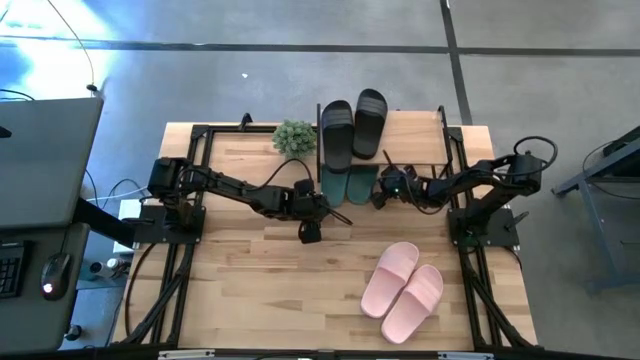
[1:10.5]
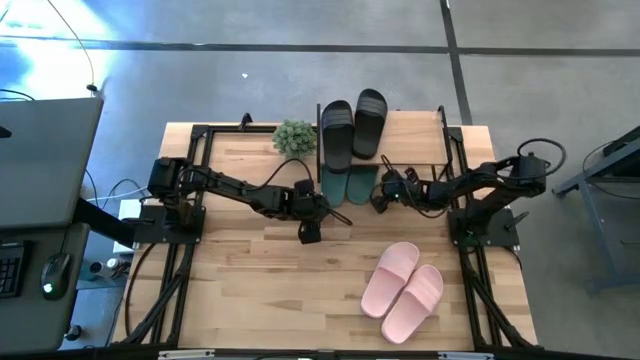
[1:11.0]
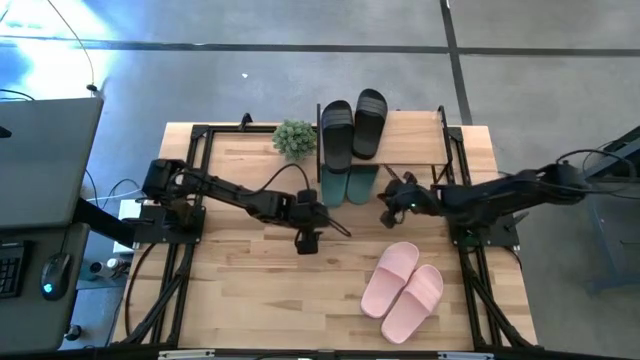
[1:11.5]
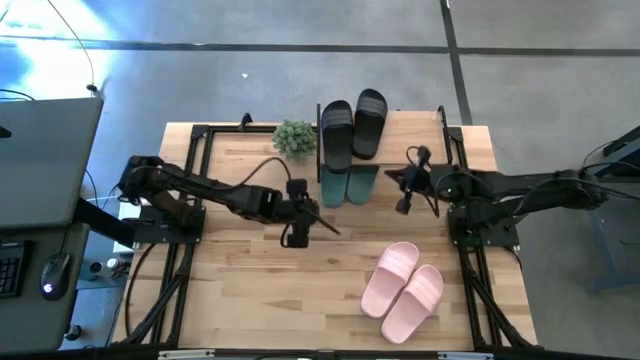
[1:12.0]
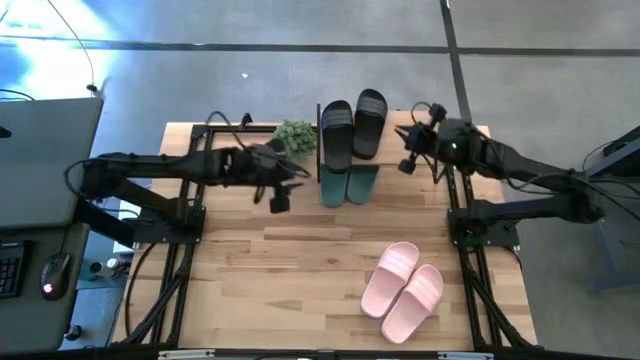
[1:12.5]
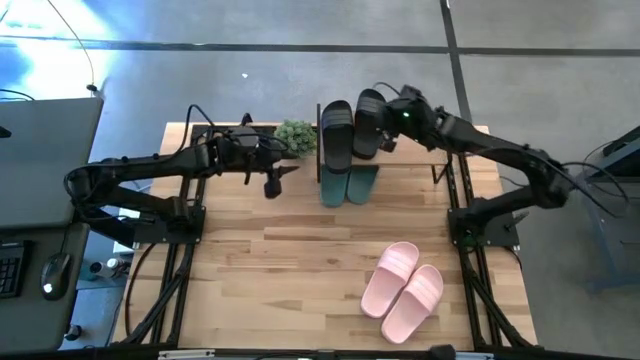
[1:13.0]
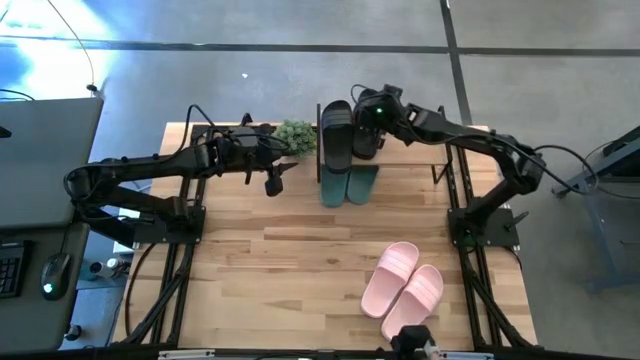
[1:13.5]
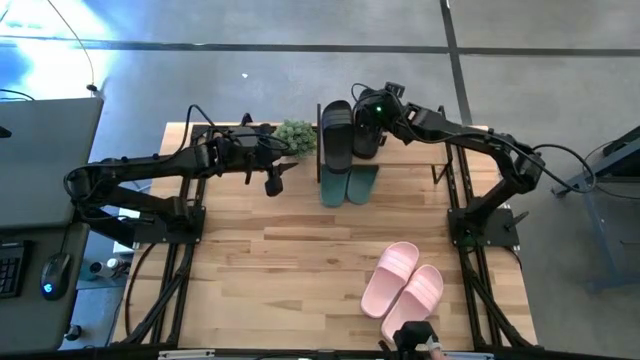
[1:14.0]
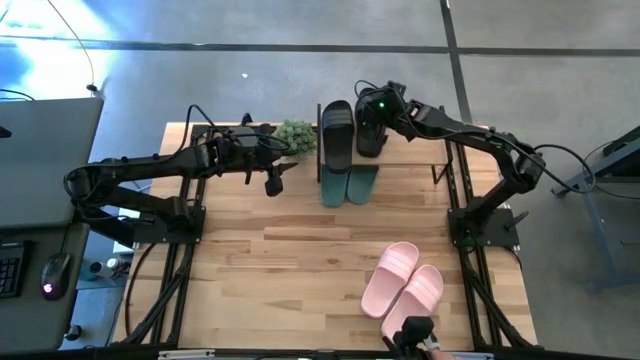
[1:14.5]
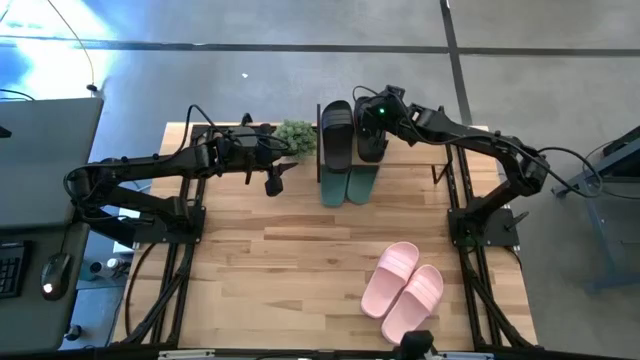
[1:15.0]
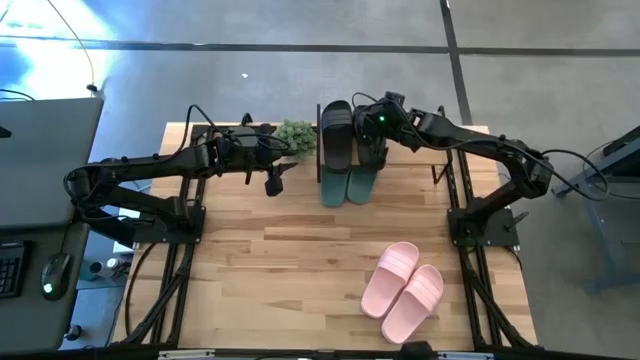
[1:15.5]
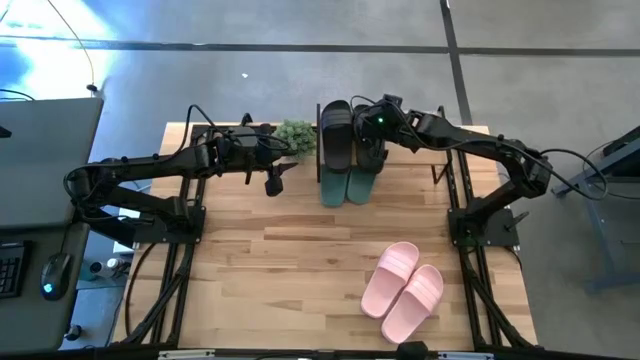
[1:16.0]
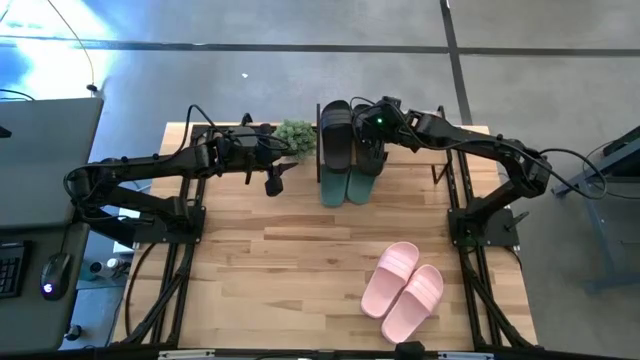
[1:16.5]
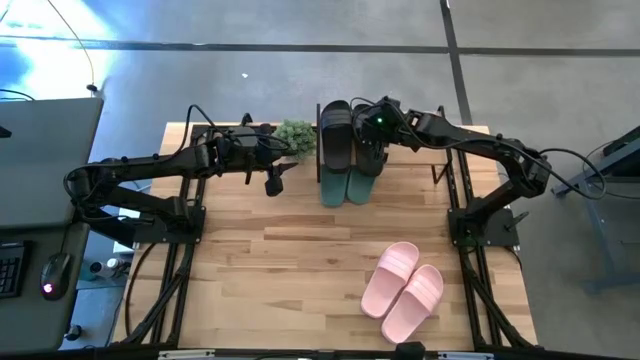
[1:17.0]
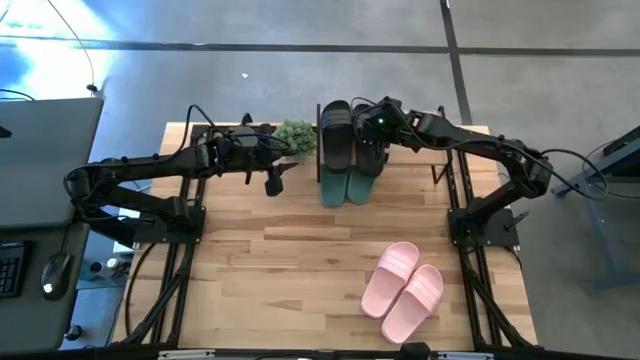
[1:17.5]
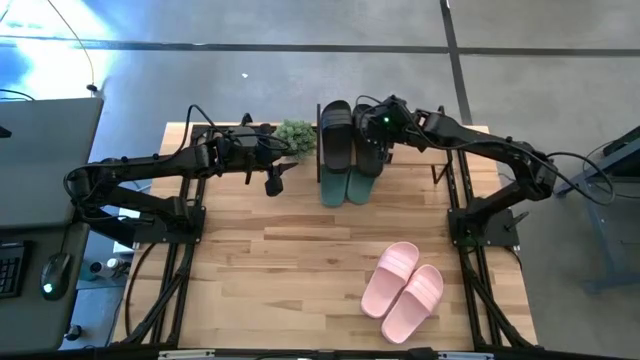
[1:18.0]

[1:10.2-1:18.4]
Task: Pick and place slides into the shelf
Adjust the right black slide on the shelf

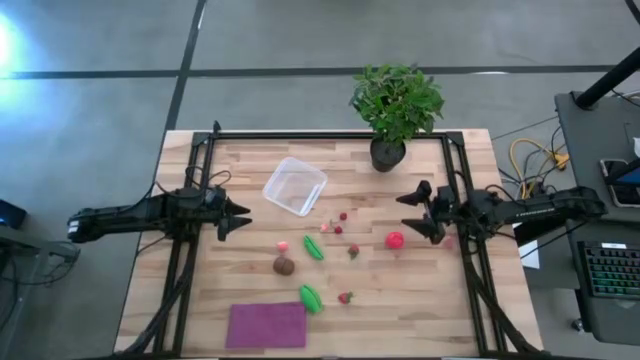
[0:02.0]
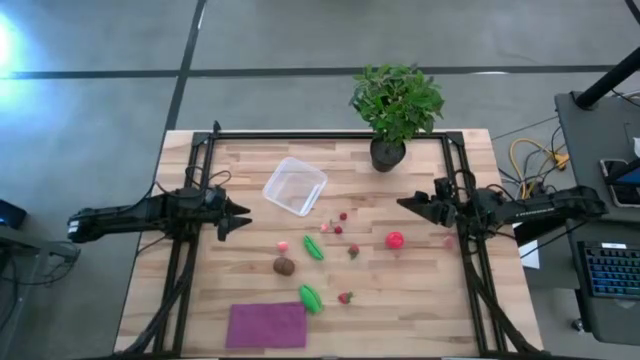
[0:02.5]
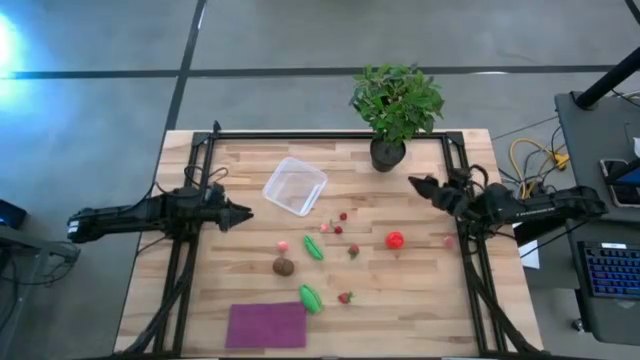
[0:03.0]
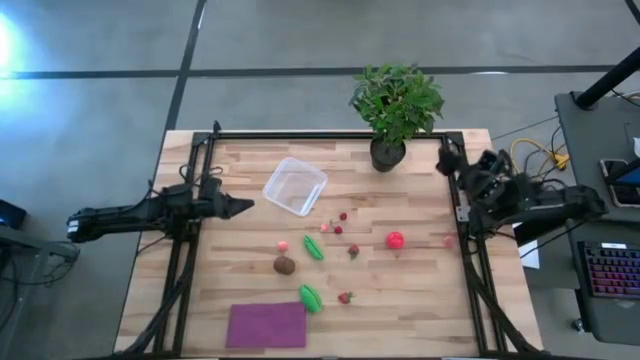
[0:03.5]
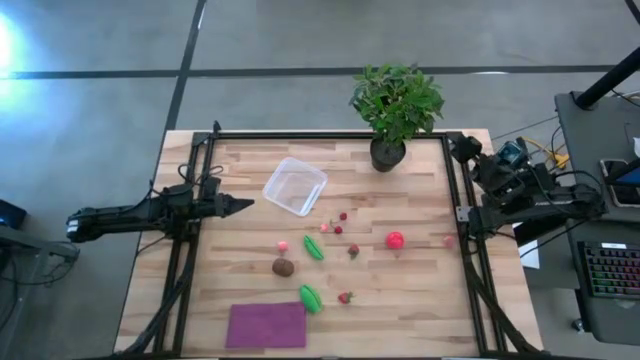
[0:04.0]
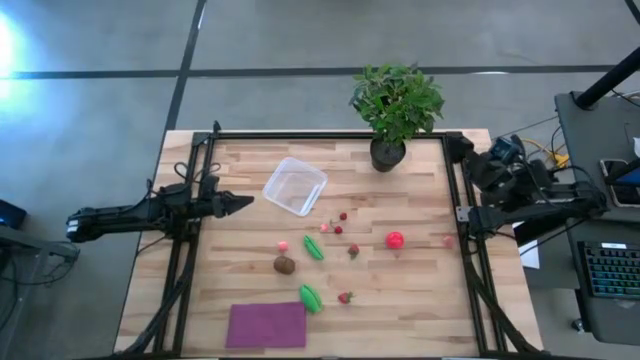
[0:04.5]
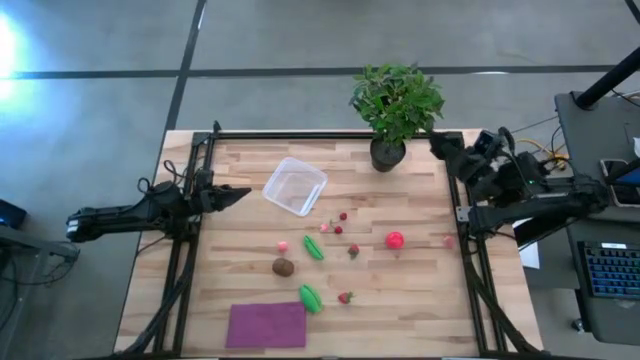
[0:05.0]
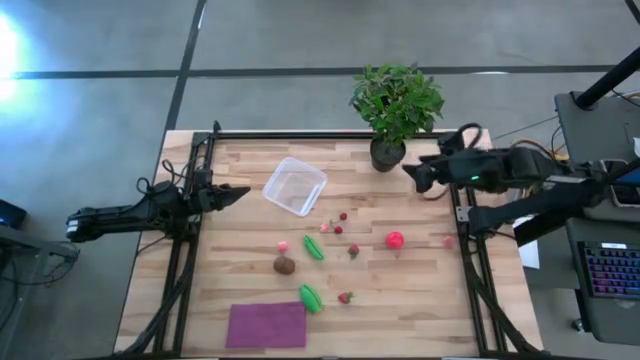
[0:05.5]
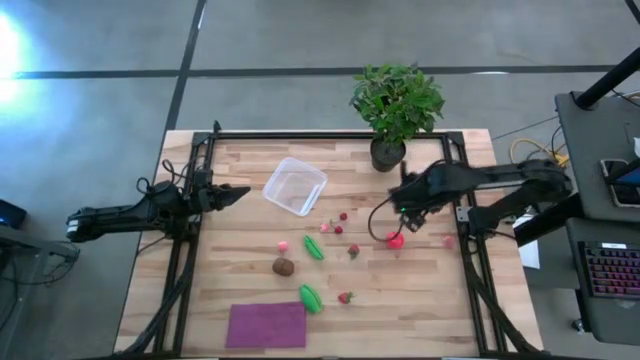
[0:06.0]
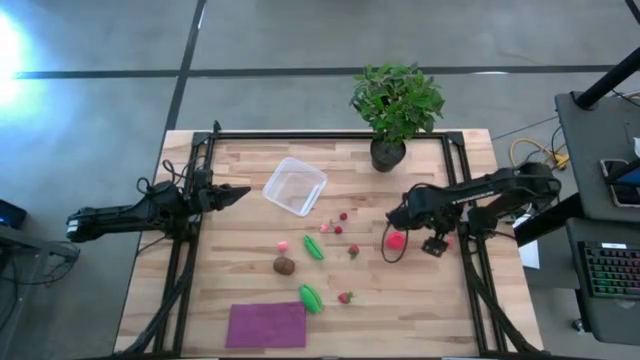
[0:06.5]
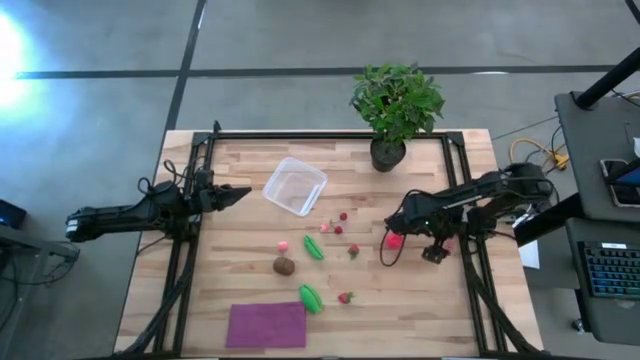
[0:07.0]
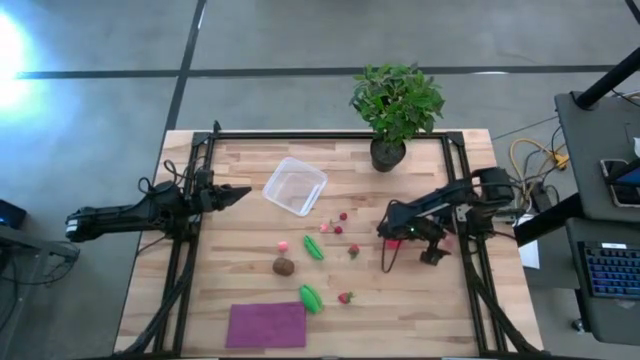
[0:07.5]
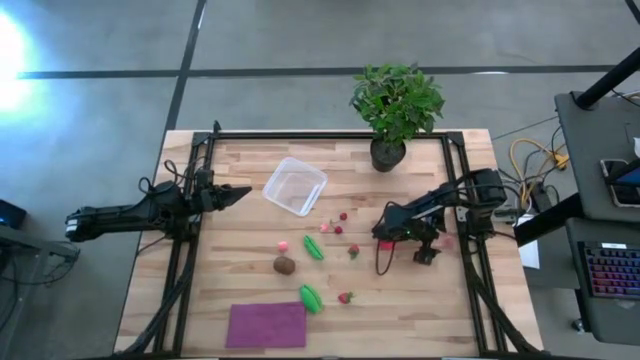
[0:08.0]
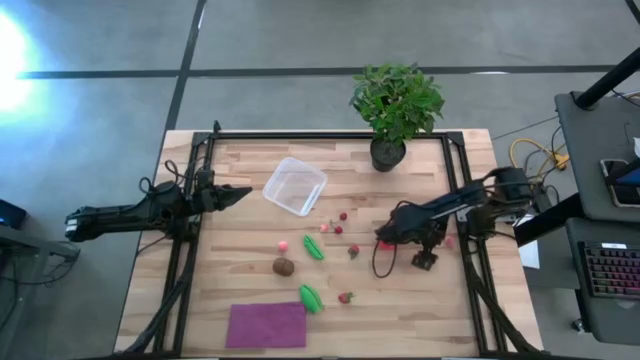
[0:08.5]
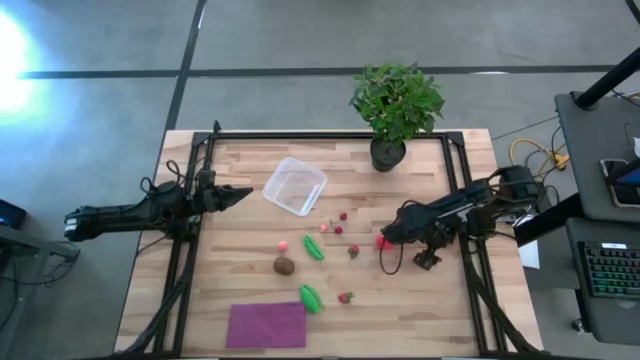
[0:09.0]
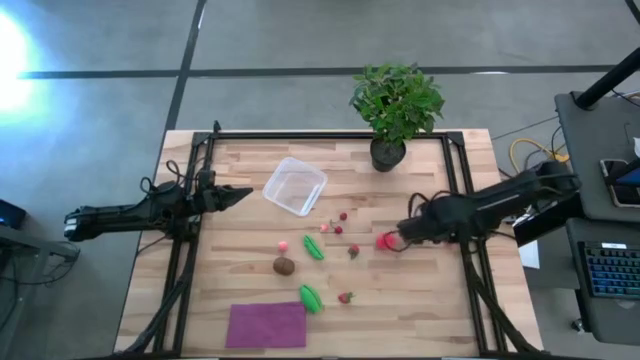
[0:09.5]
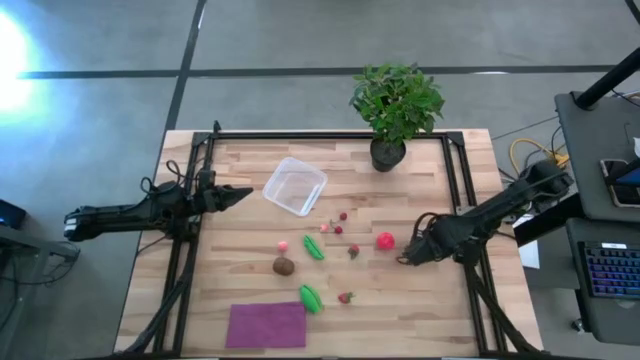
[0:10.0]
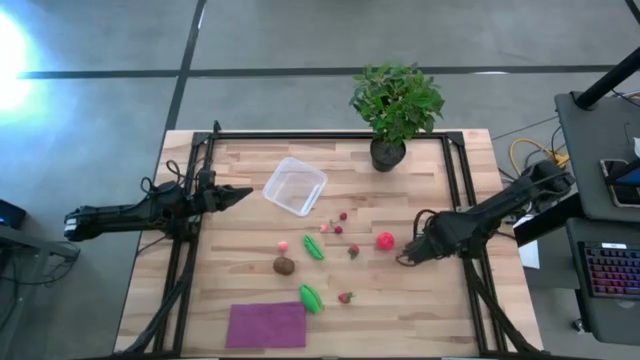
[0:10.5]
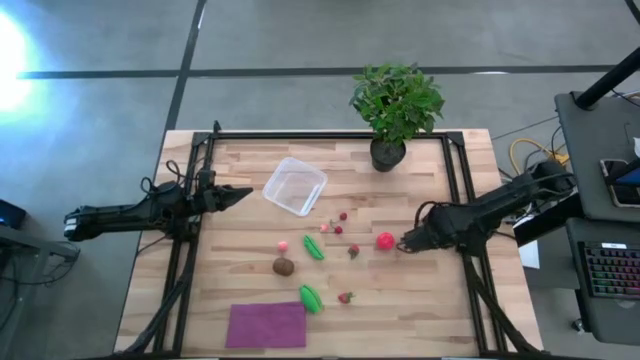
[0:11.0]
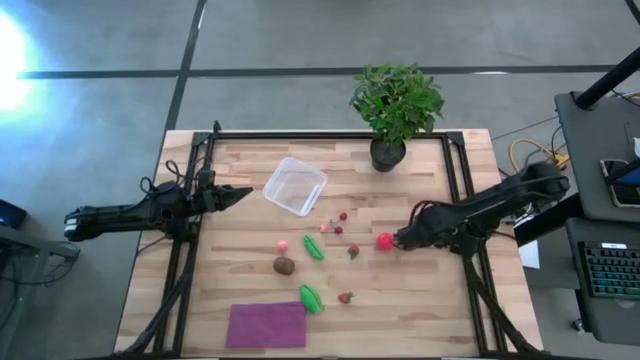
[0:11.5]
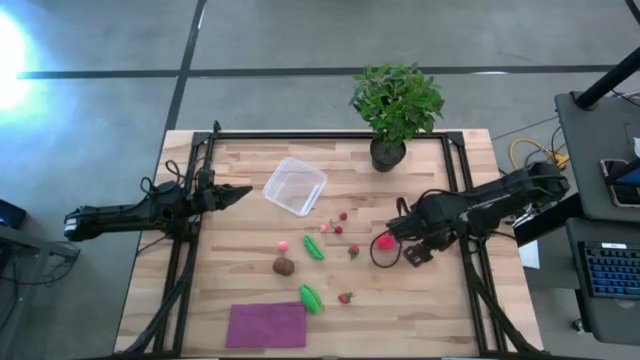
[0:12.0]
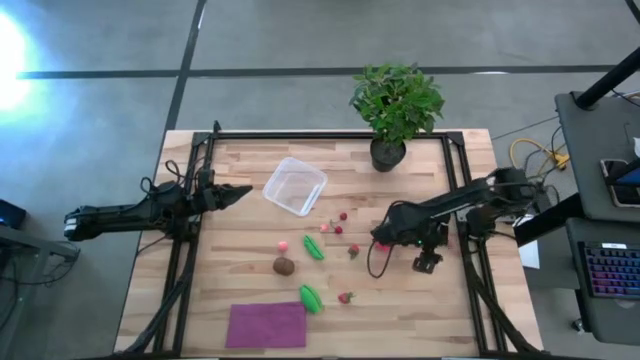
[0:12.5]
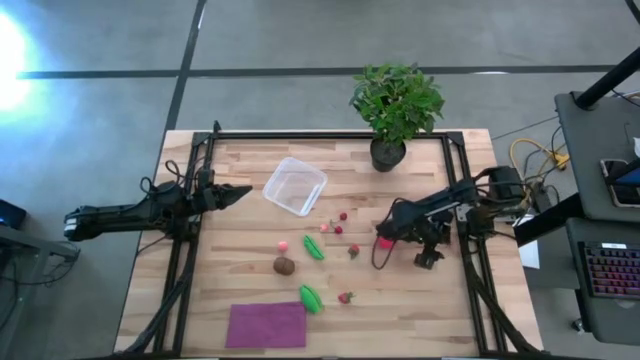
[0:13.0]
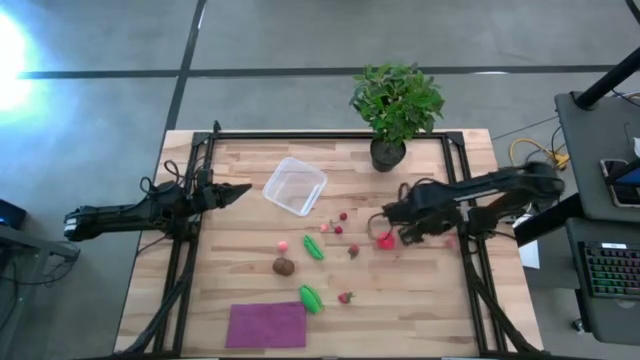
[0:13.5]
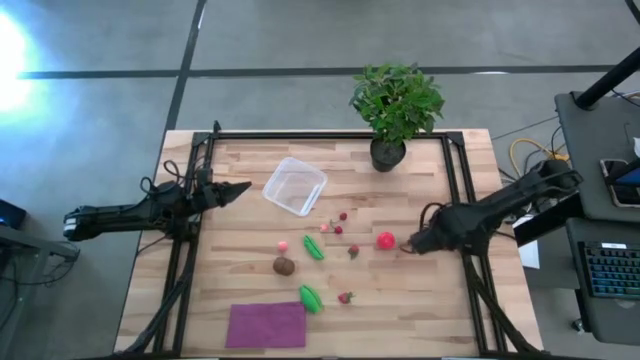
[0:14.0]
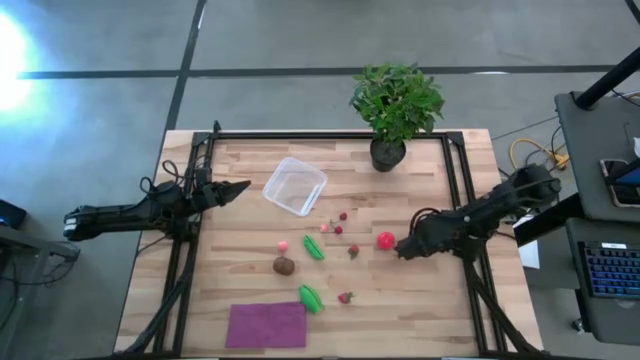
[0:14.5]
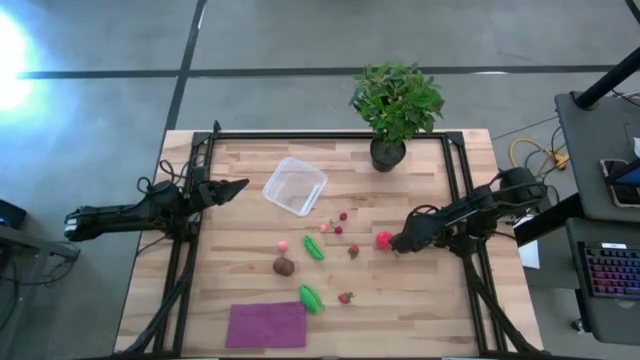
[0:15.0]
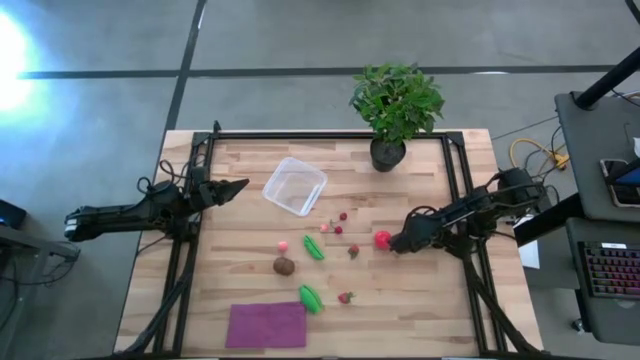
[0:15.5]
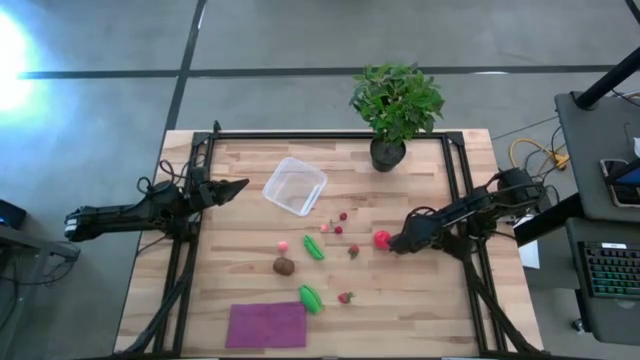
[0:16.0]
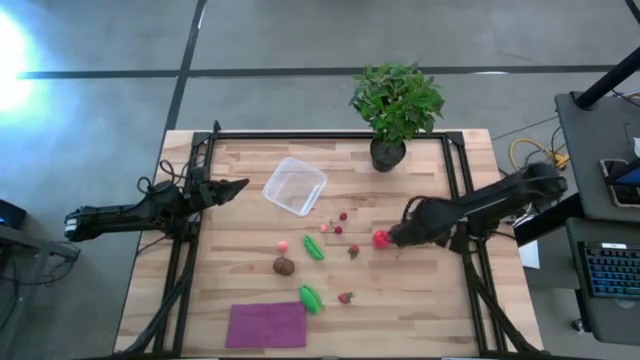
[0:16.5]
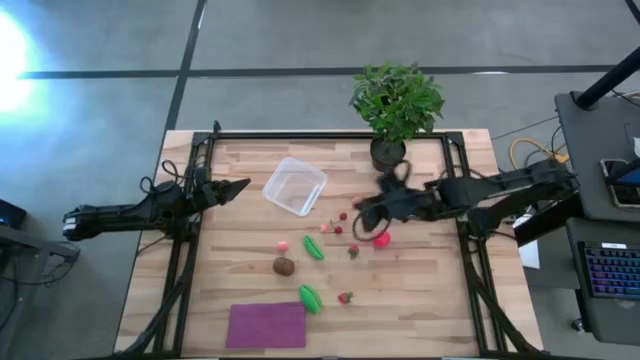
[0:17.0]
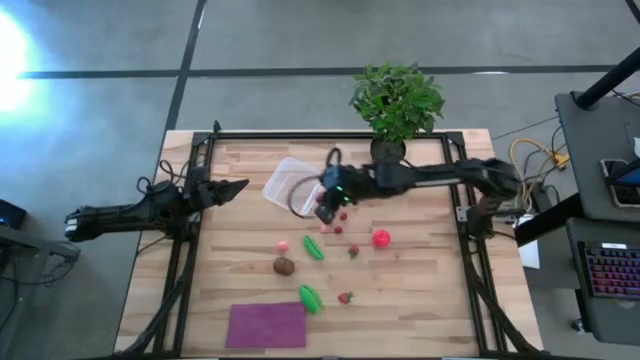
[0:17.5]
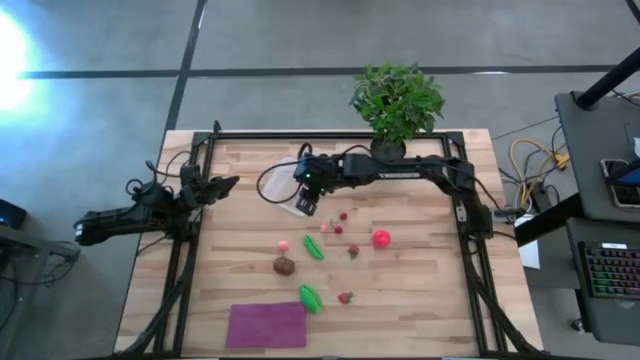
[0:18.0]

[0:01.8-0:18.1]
Task: Pick and placing Produce into tupperware
Put the right peach into the transparent bin
